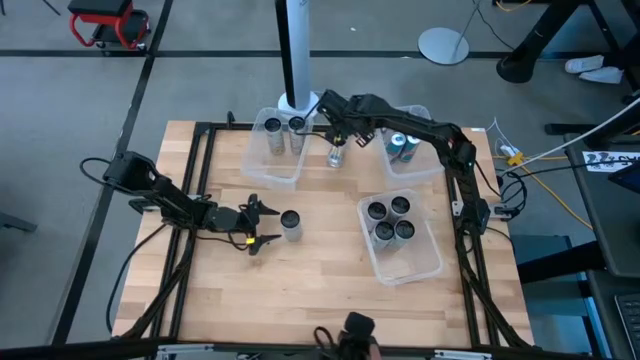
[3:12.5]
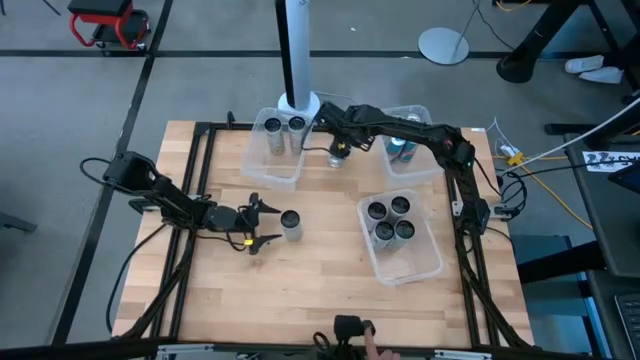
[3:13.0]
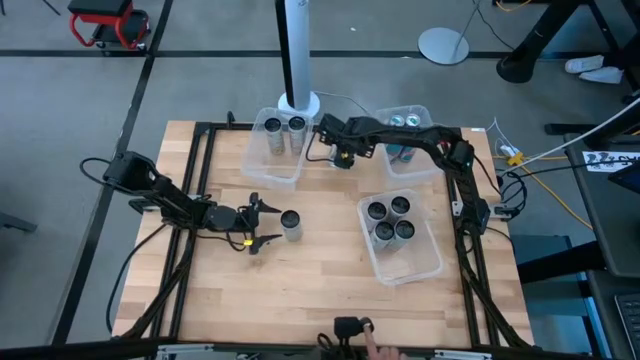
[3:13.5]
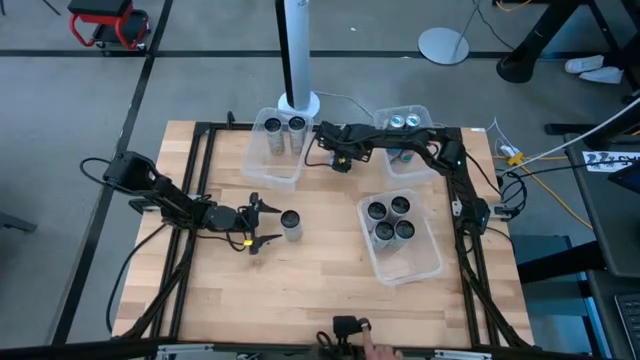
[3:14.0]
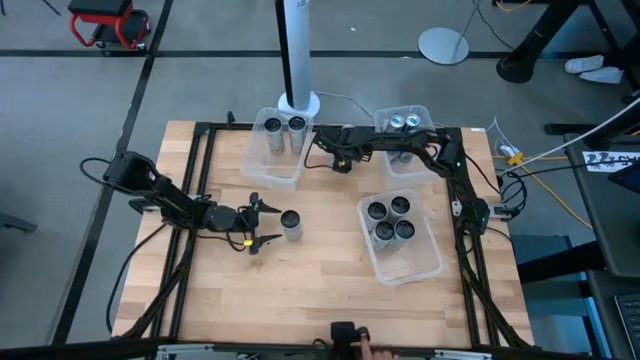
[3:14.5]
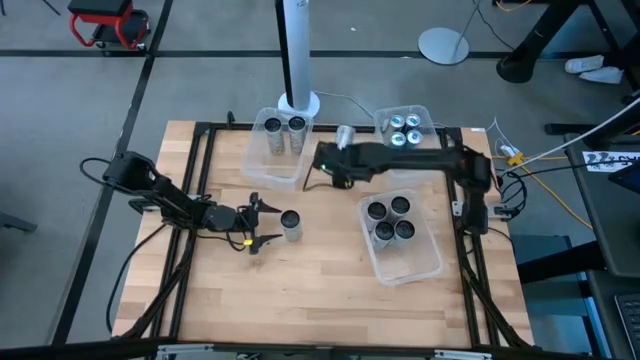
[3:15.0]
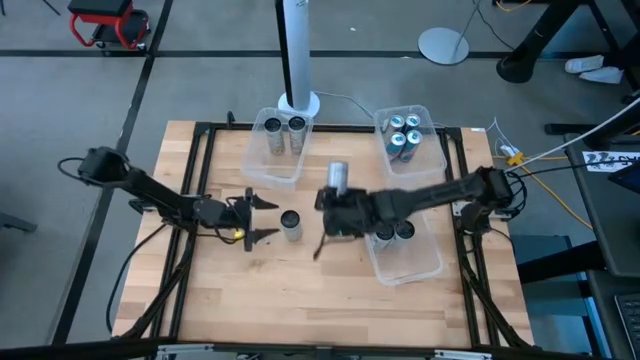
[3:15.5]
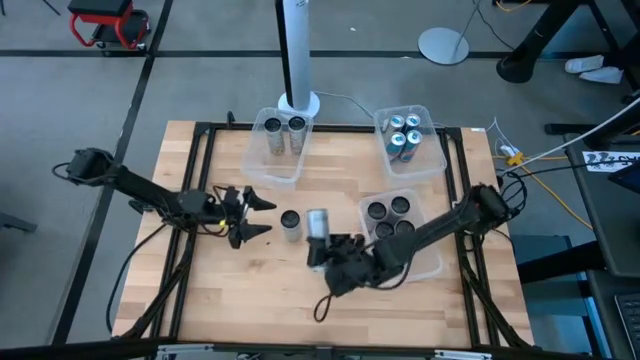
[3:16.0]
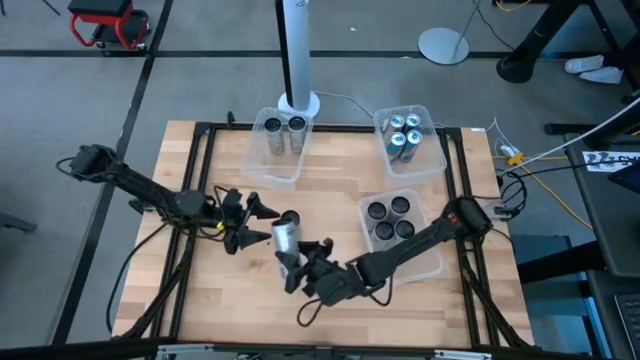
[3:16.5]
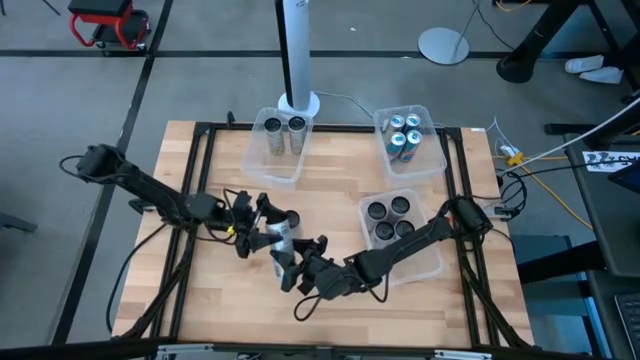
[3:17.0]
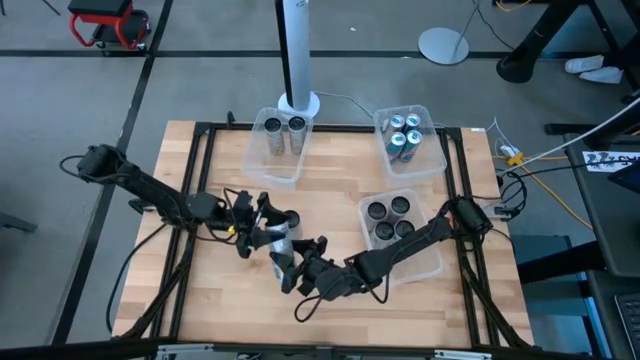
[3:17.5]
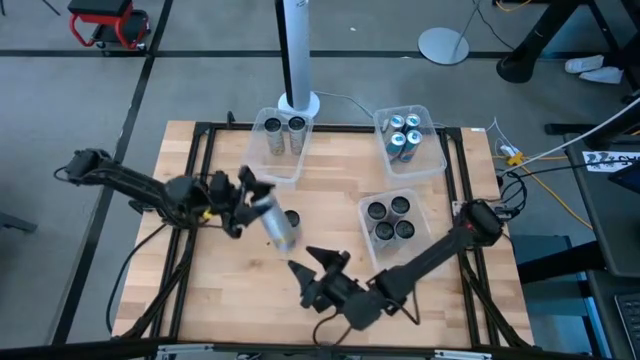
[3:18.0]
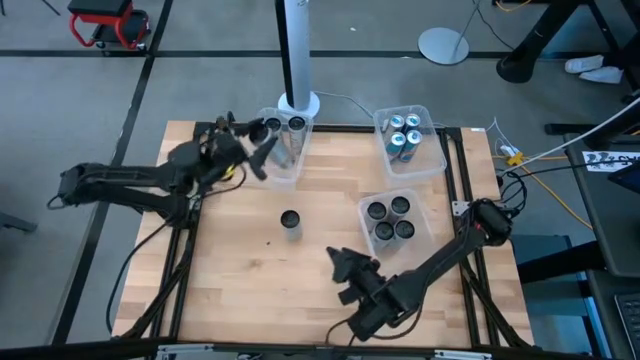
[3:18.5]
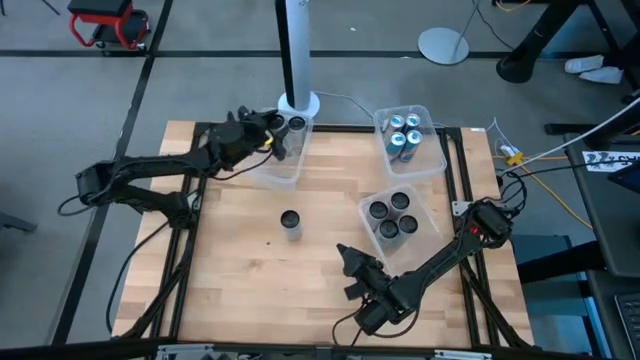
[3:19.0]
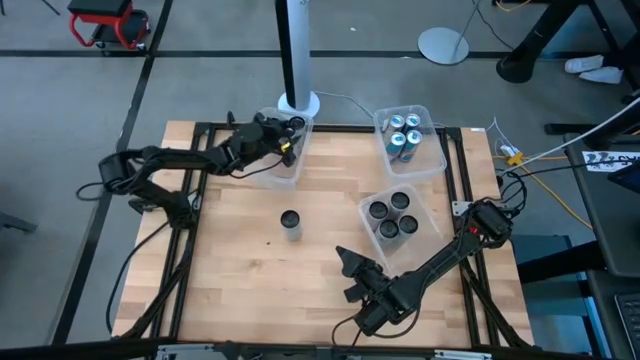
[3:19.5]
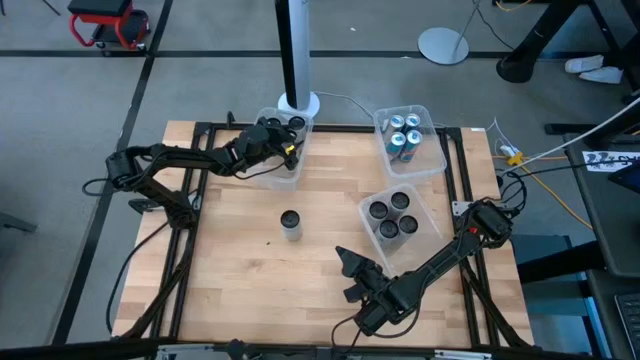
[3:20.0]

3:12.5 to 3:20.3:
Task: Sort soda cans
Put the white yellow soda can into the top left transparent bin

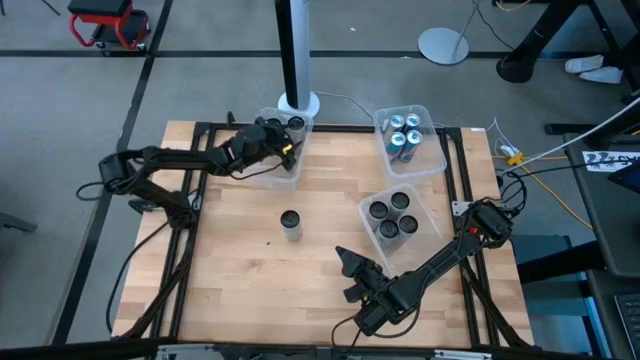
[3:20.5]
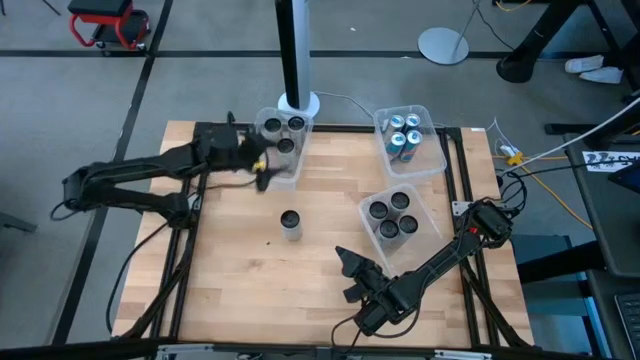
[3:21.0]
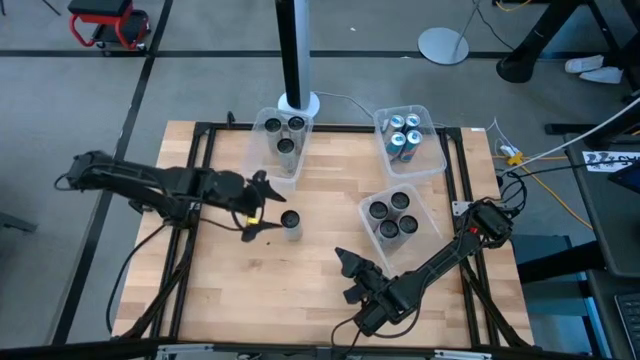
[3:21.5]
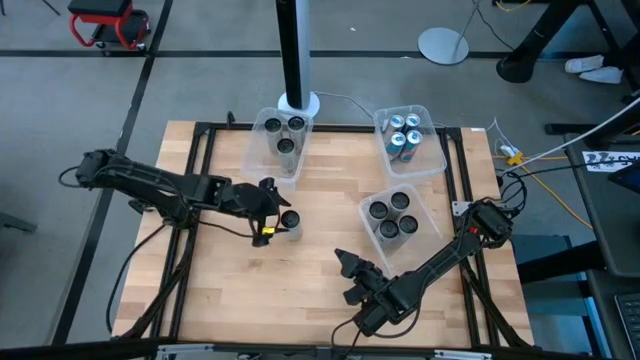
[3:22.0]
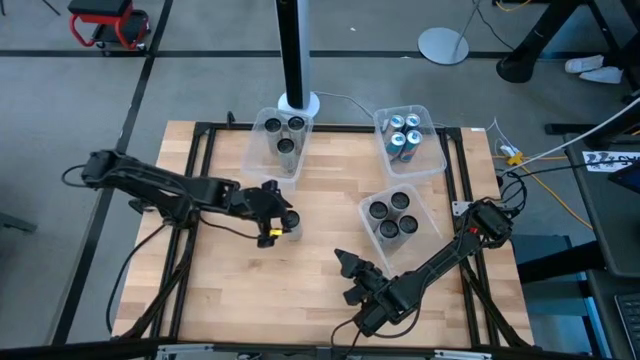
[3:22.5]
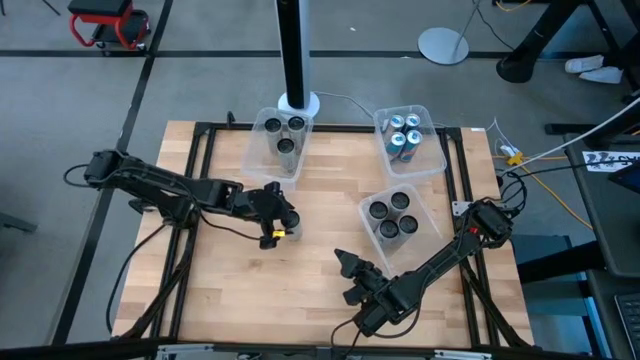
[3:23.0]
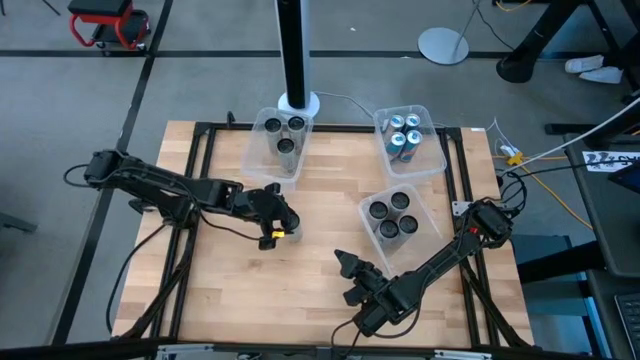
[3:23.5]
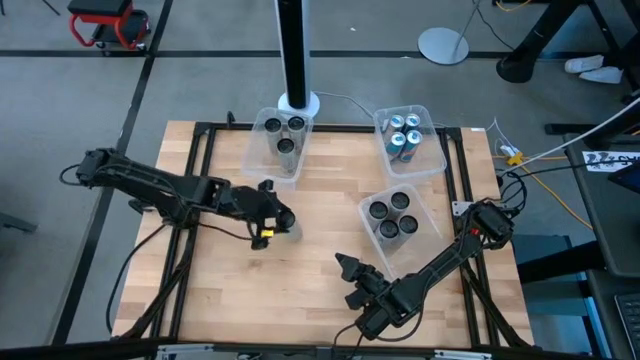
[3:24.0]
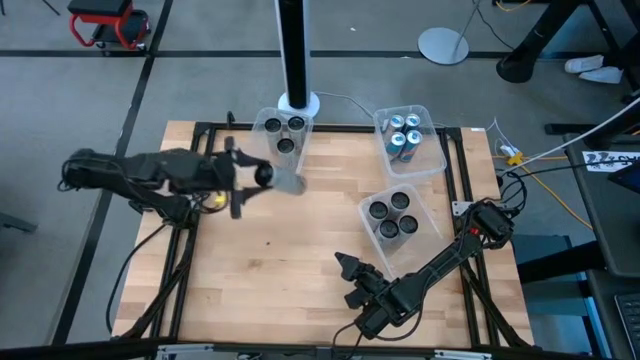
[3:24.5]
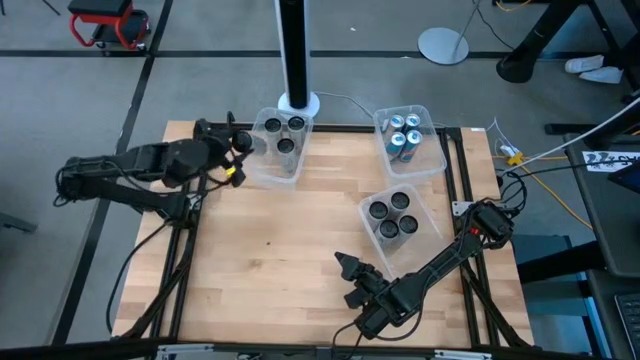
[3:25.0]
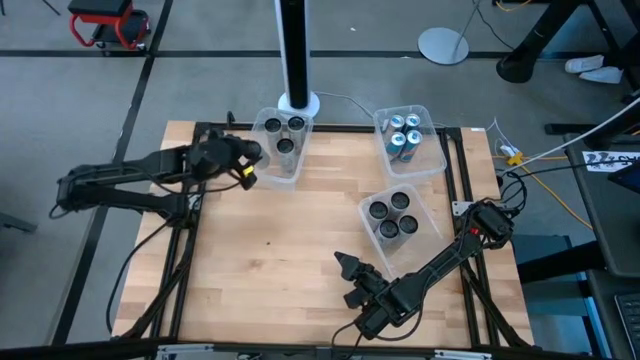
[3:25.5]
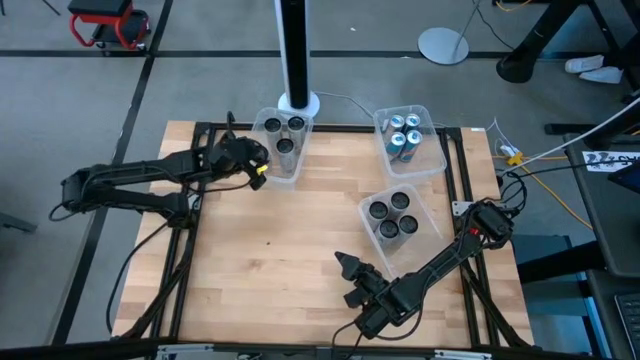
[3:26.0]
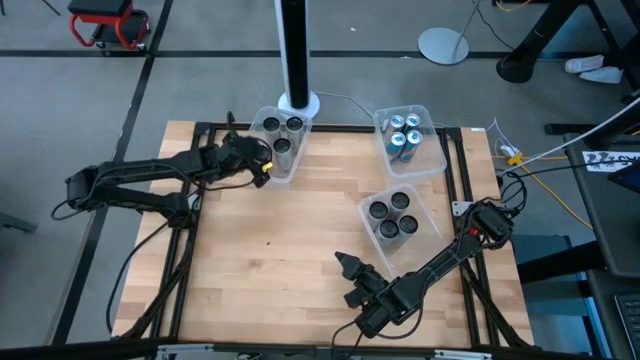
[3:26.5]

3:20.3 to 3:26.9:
Put the white yellow soda can into the top left transparent bin

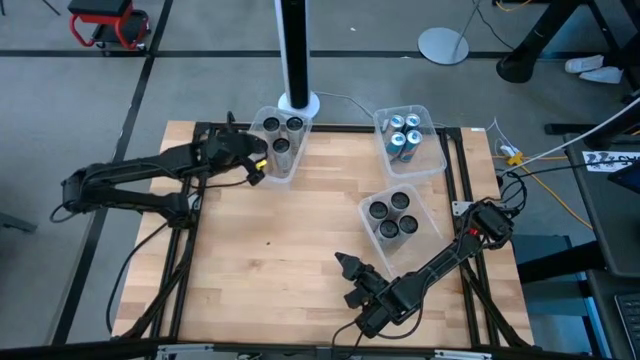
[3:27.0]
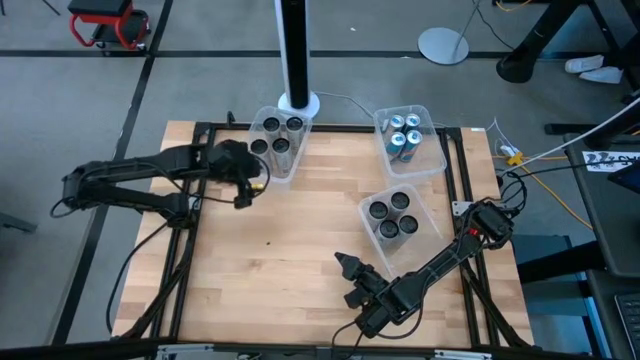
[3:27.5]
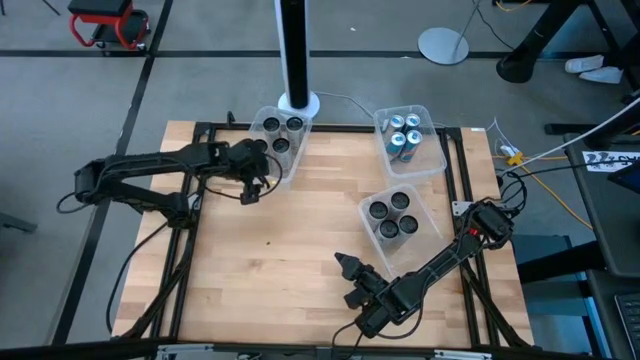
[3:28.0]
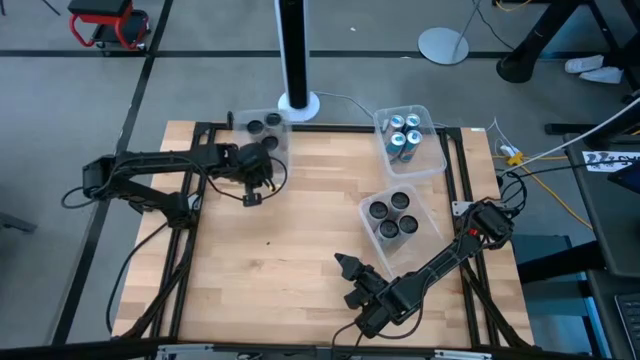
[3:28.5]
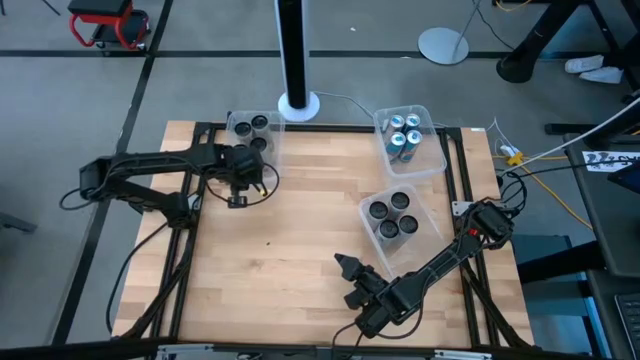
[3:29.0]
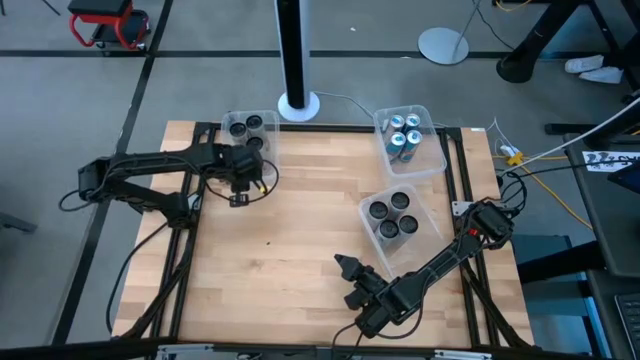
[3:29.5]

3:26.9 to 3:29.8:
Adjust the top left transparent bin

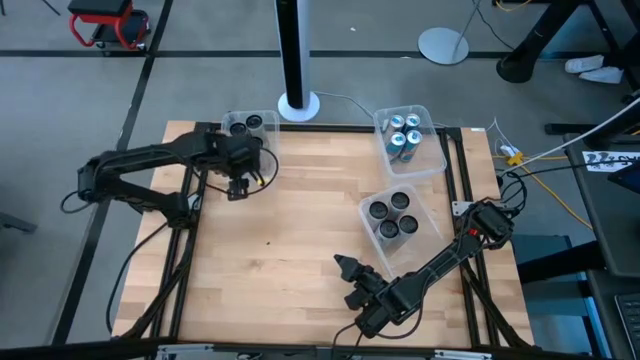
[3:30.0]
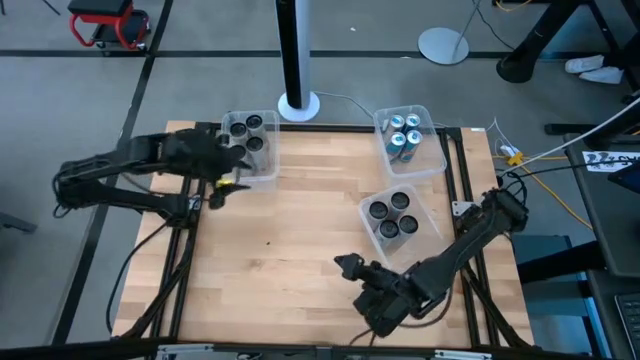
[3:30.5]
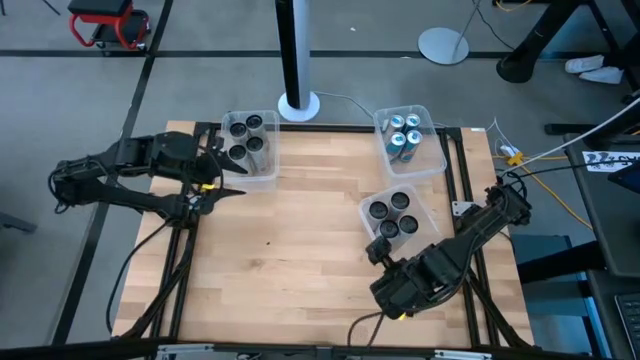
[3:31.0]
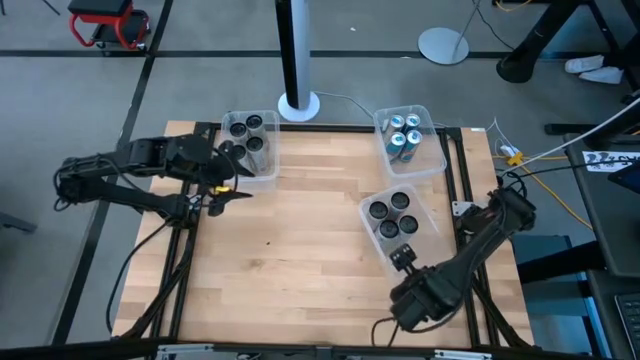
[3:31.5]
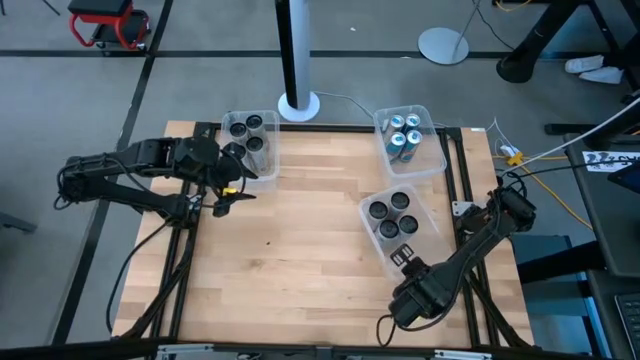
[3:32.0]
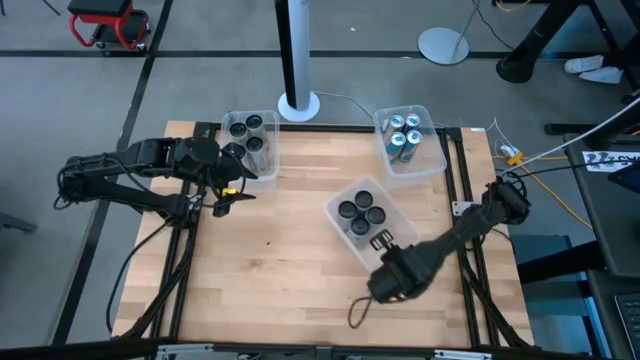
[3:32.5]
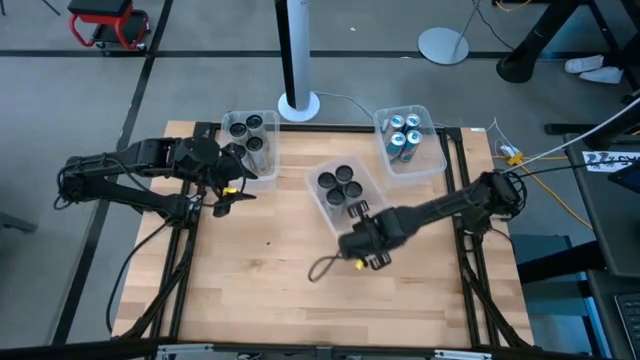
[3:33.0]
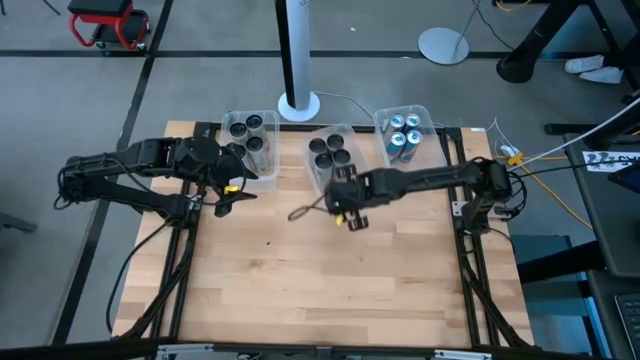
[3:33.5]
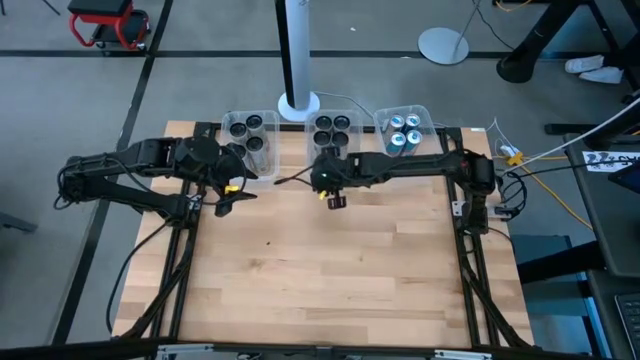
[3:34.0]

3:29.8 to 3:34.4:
Move the bottom right transparent bin to the top center of the table
